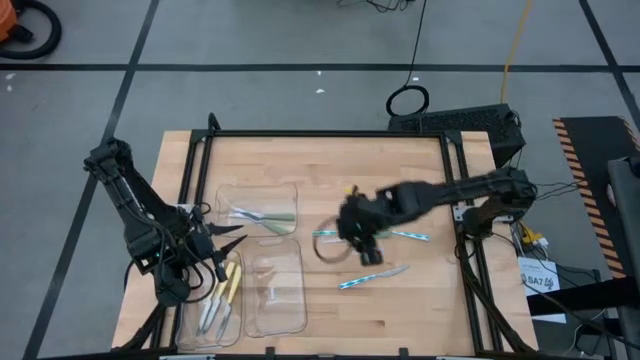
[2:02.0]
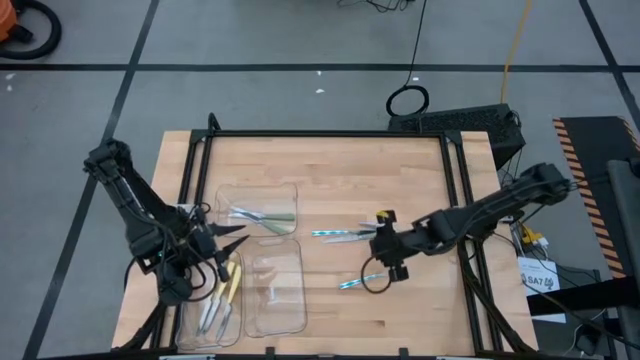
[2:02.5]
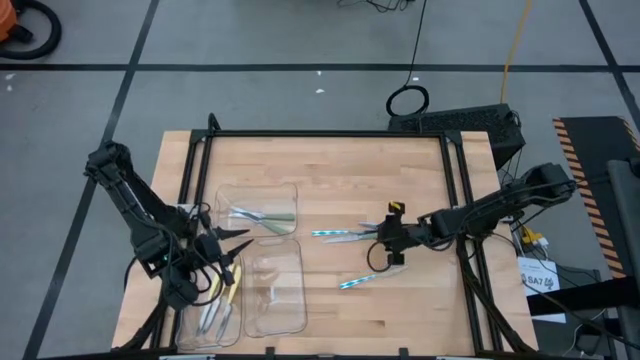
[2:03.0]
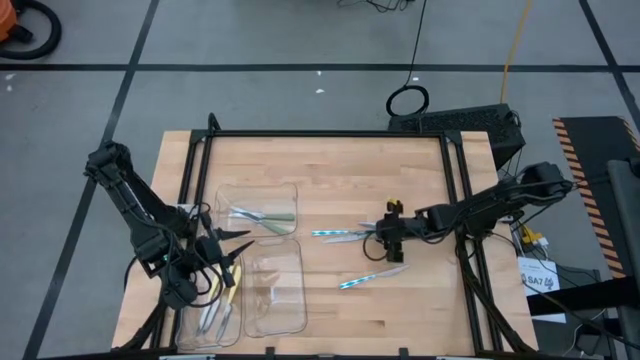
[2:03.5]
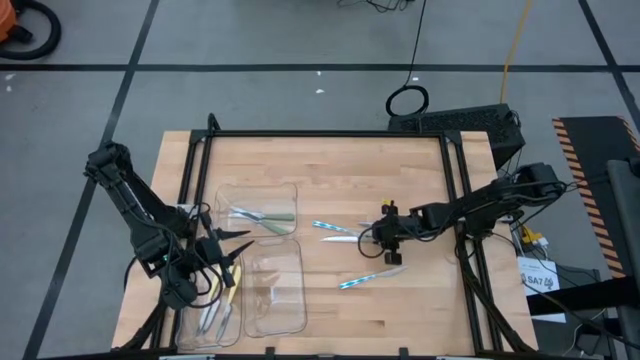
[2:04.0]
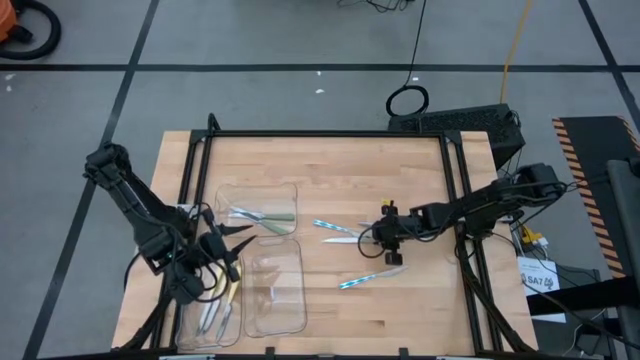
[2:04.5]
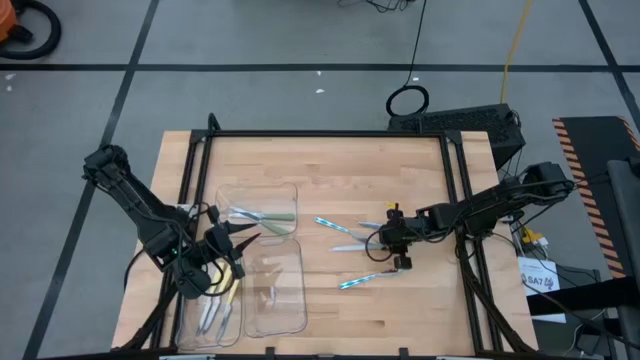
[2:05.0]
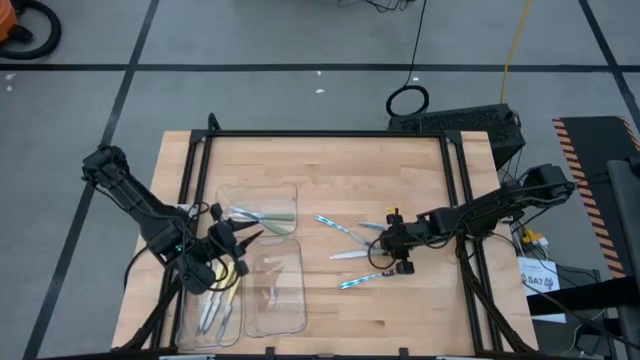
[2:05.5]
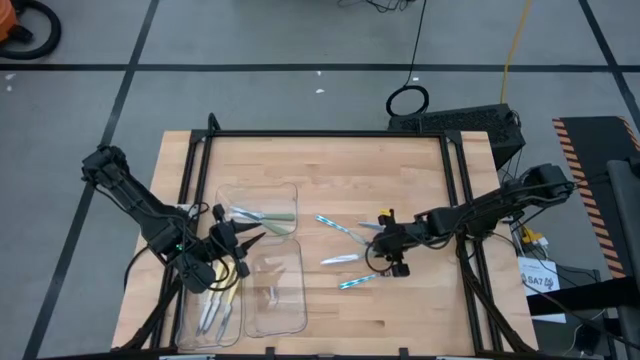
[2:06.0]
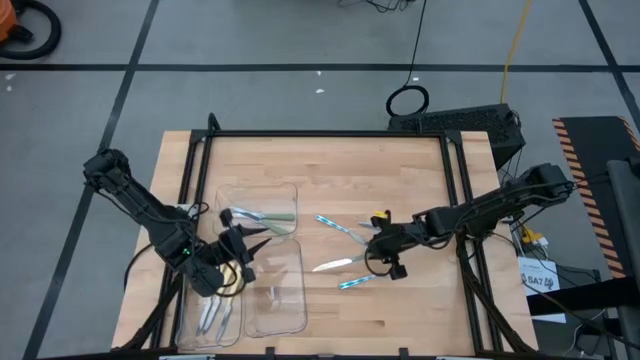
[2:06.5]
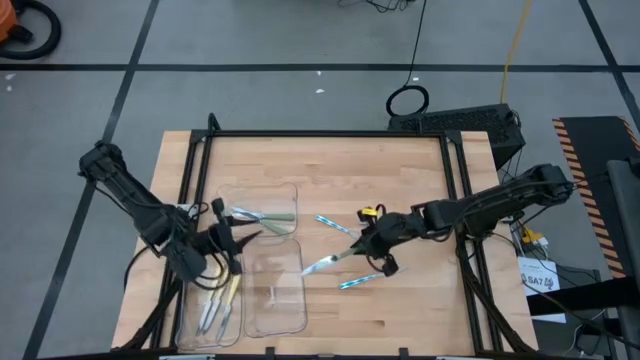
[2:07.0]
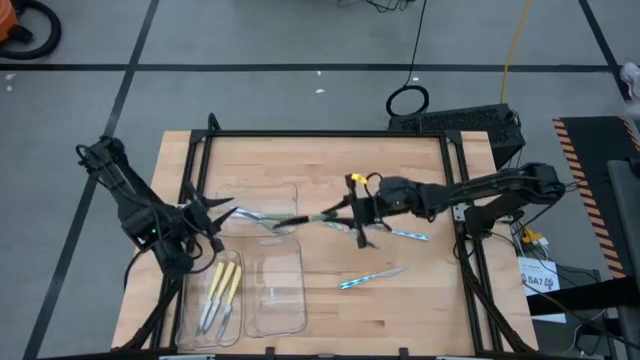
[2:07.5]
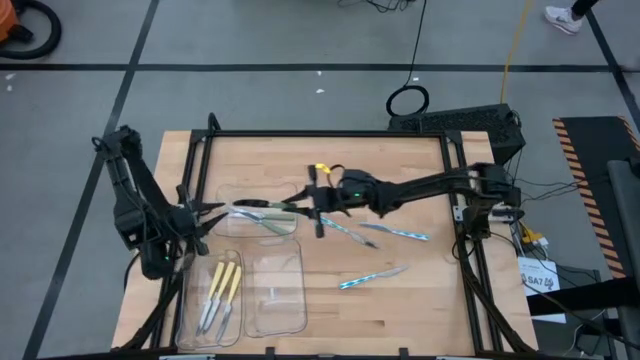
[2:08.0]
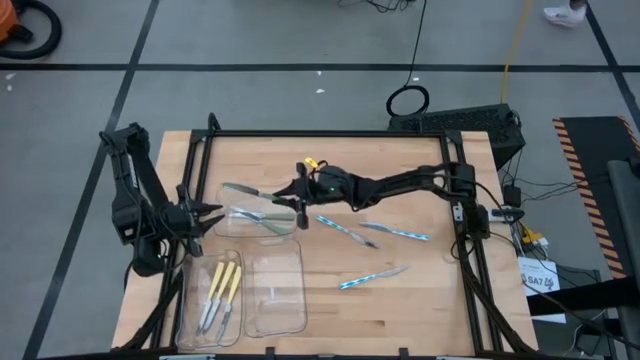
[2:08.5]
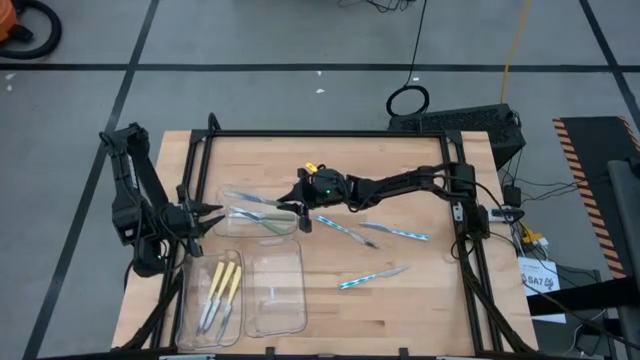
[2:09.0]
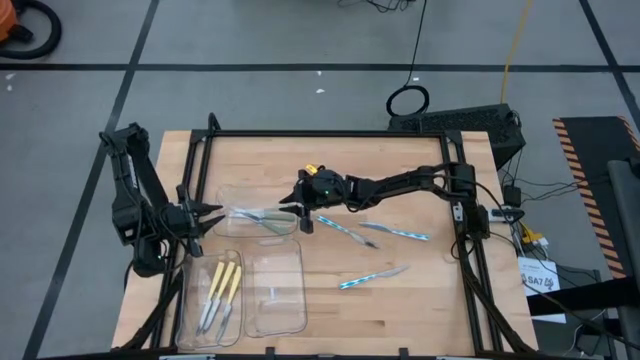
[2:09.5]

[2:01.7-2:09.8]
Task: Sort silverware by color (type)
Put the green table knife into the top transparent bin

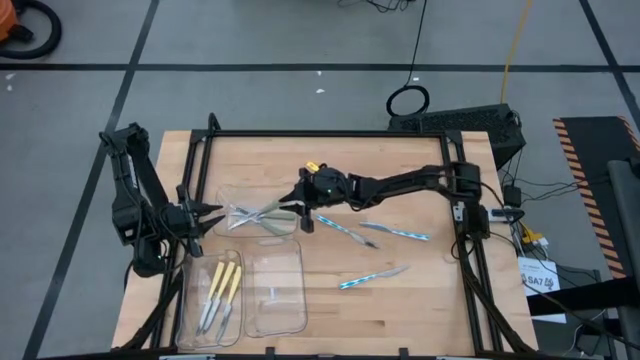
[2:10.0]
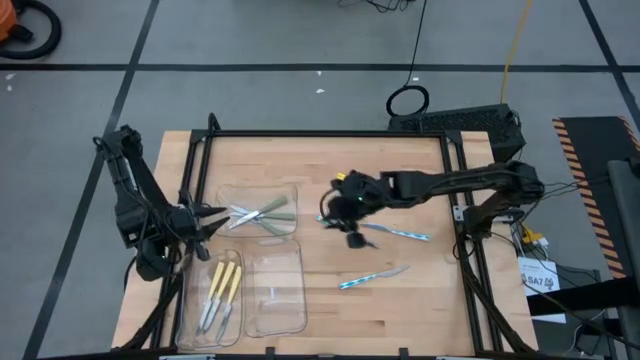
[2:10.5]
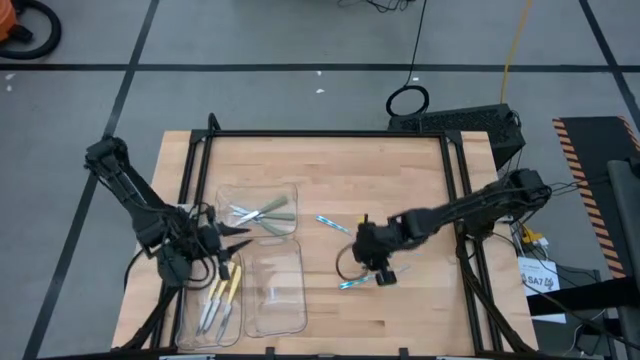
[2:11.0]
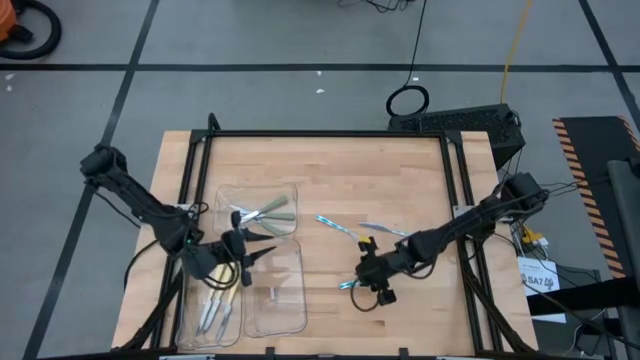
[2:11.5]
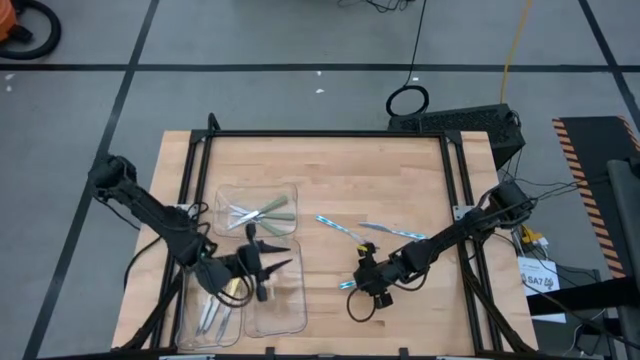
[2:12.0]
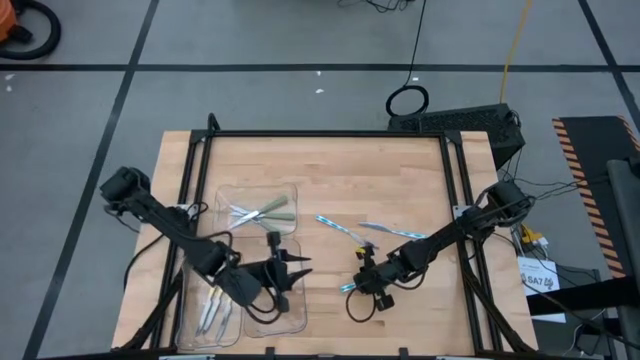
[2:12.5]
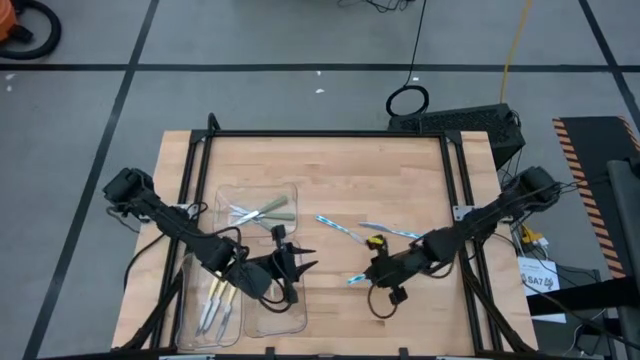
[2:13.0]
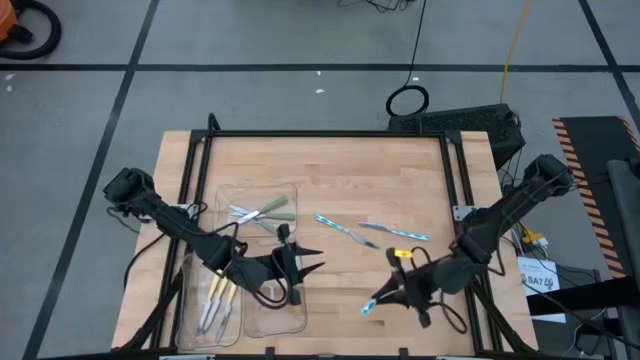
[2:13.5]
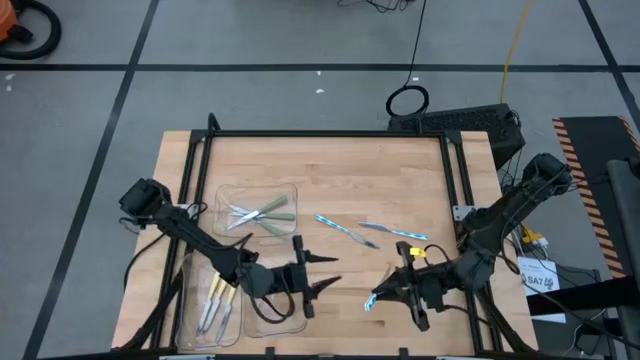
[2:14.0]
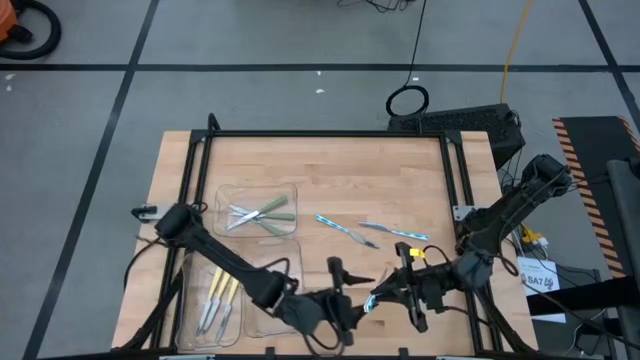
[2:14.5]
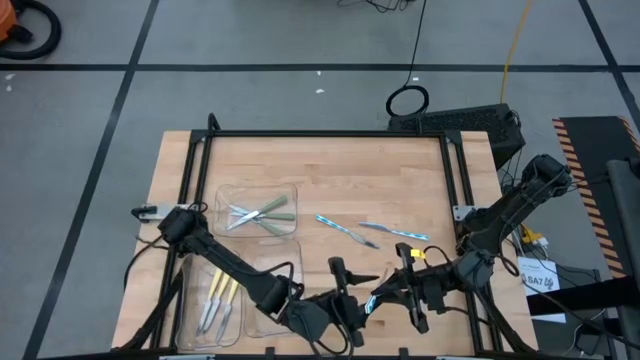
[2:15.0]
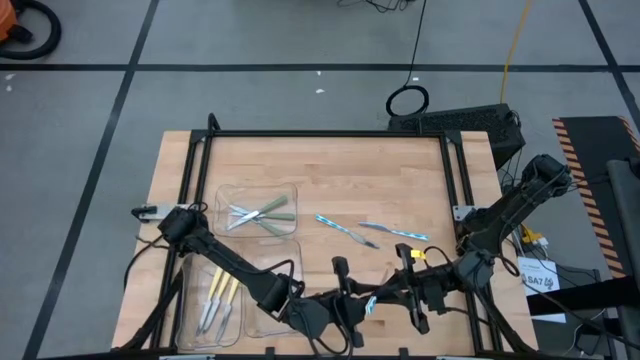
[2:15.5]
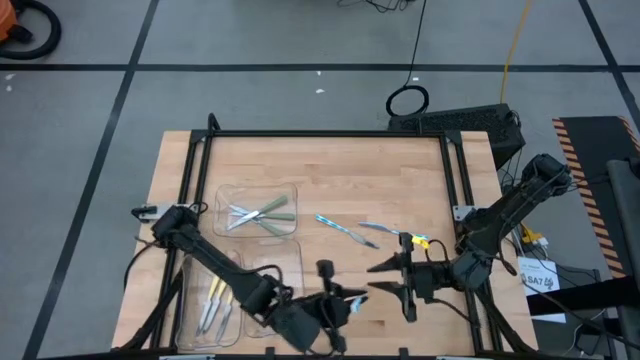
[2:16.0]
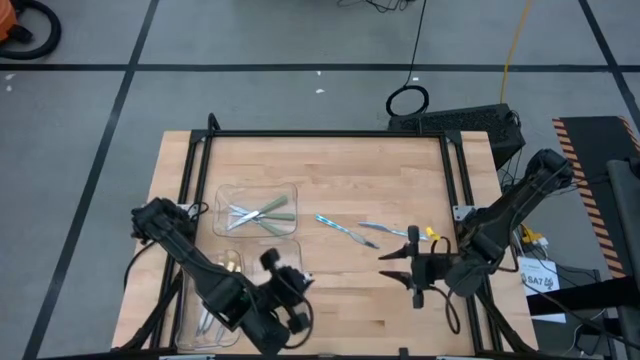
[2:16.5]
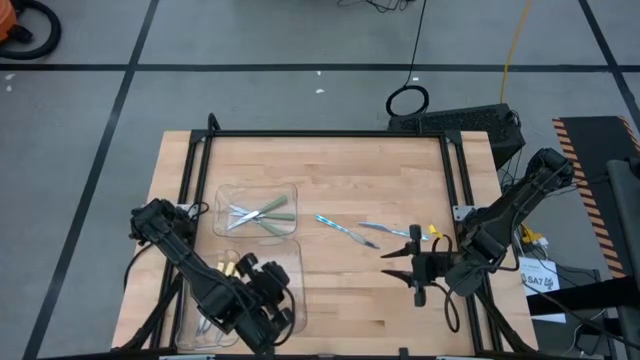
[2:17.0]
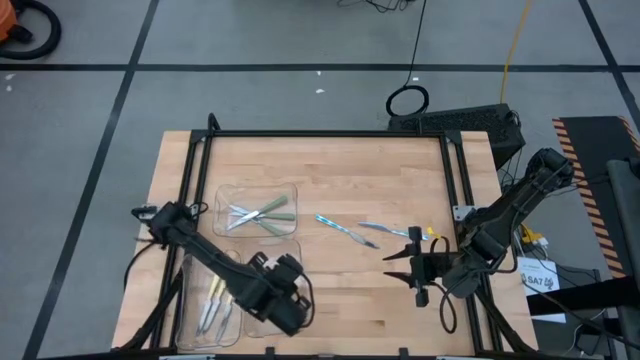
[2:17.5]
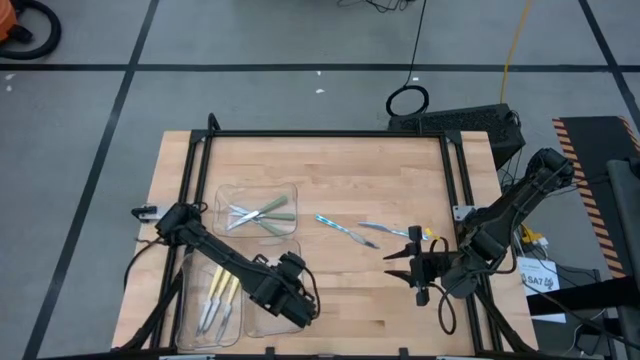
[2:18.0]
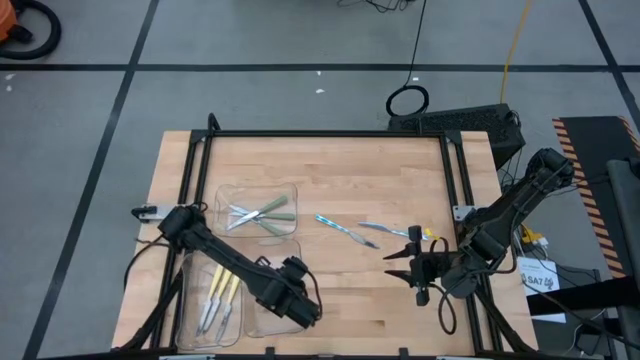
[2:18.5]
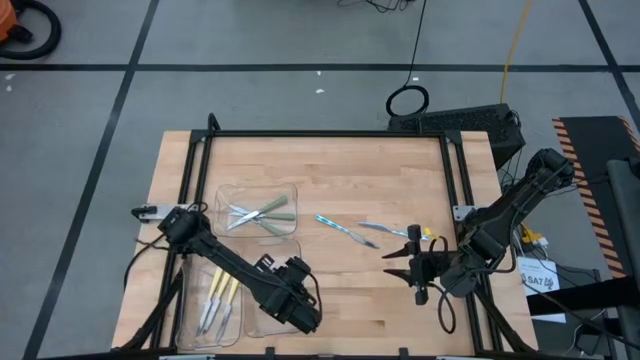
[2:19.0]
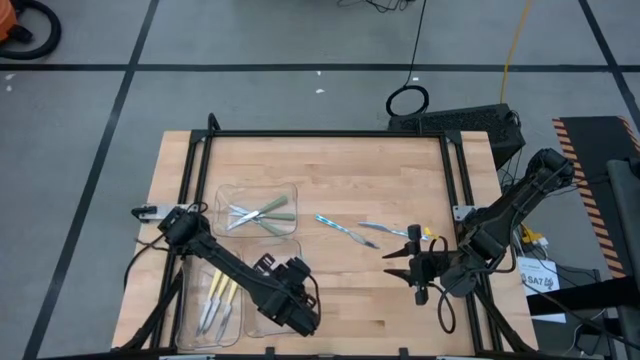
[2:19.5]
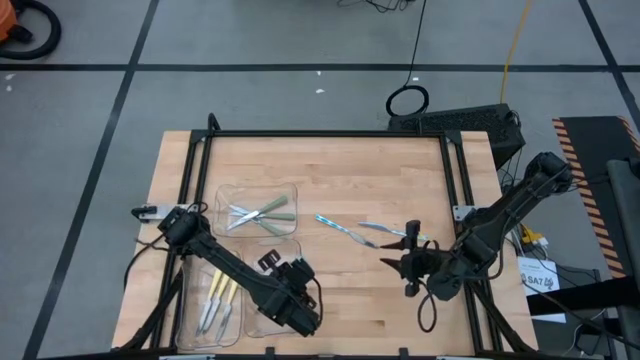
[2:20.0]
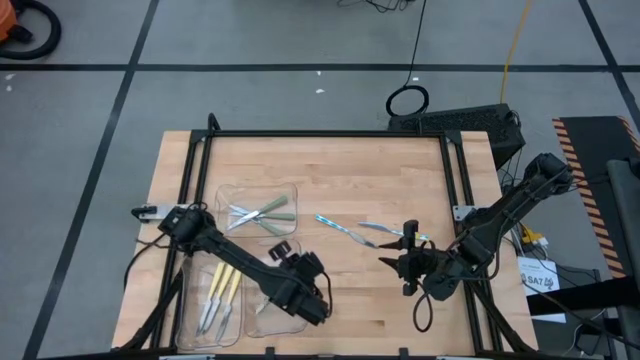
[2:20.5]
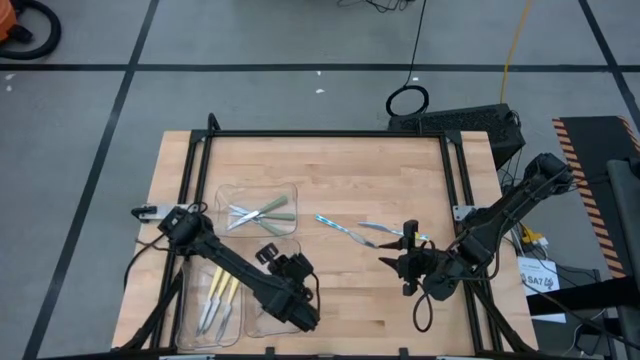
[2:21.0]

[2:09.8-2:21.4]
Put the bottom blue table knife into the bottom right transparent bin
